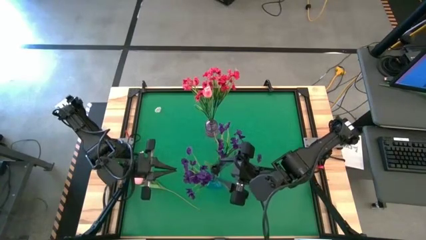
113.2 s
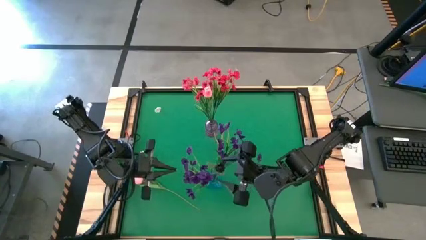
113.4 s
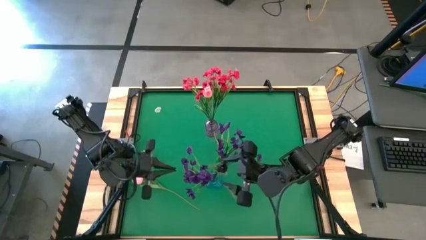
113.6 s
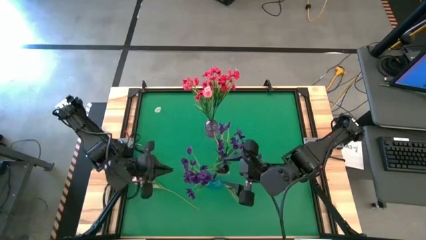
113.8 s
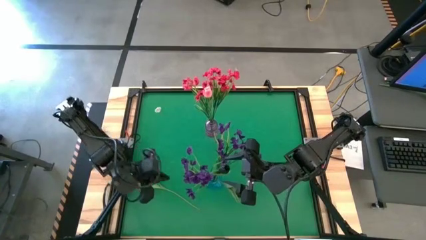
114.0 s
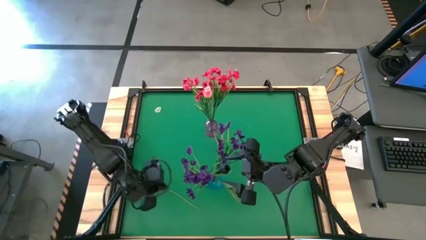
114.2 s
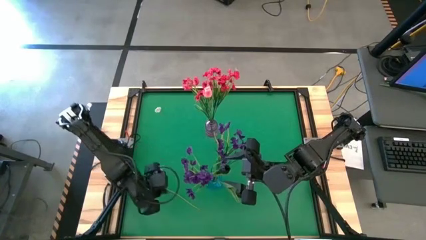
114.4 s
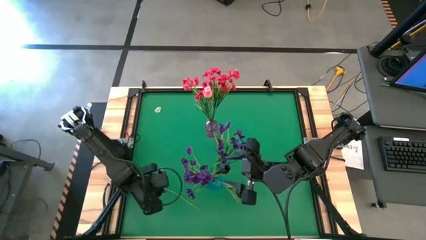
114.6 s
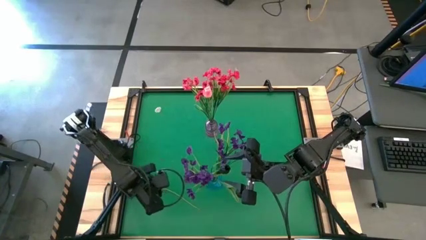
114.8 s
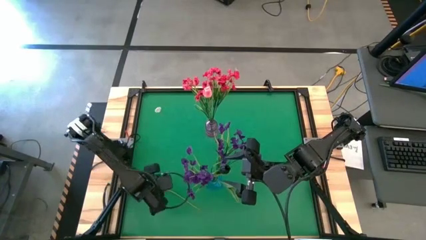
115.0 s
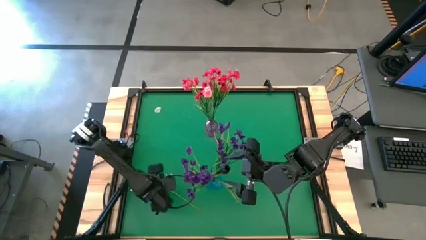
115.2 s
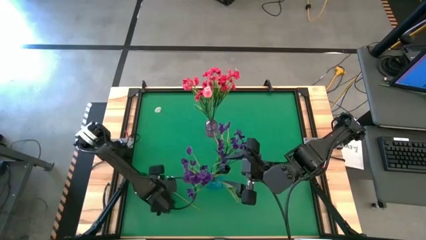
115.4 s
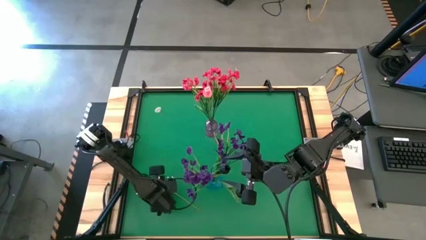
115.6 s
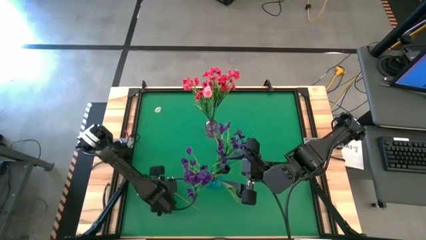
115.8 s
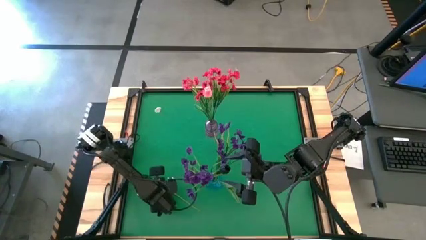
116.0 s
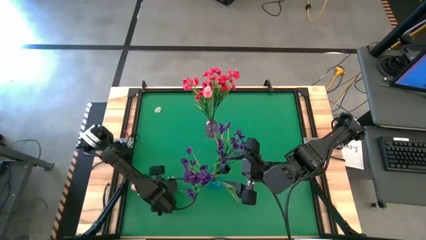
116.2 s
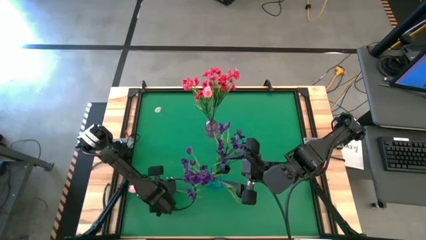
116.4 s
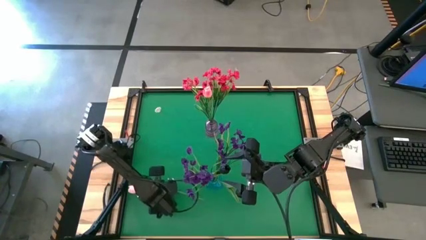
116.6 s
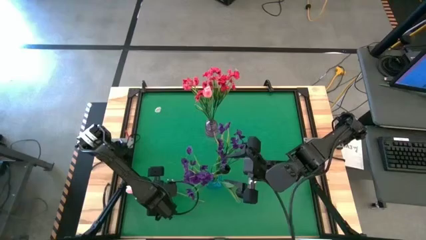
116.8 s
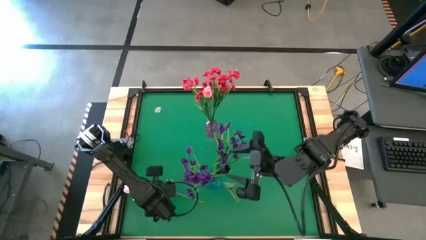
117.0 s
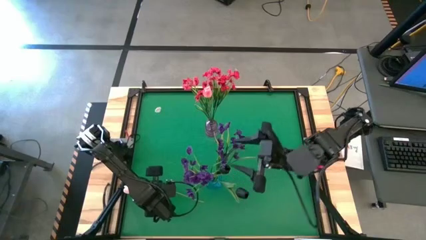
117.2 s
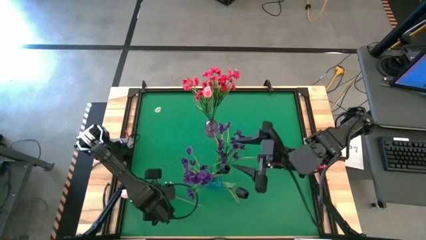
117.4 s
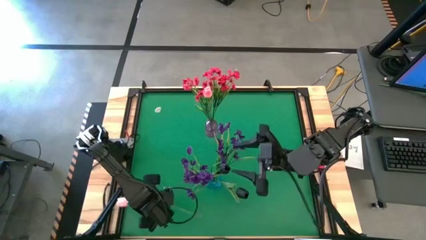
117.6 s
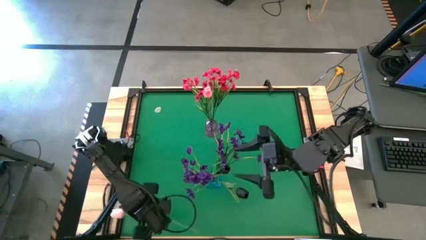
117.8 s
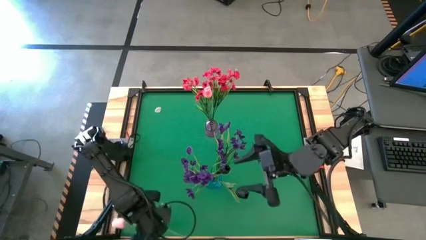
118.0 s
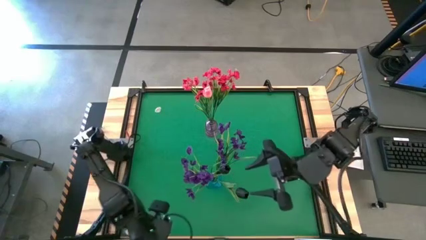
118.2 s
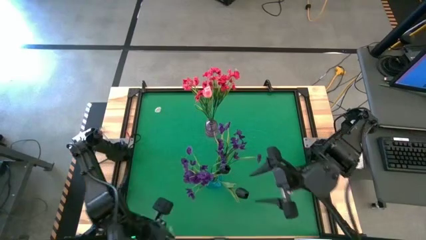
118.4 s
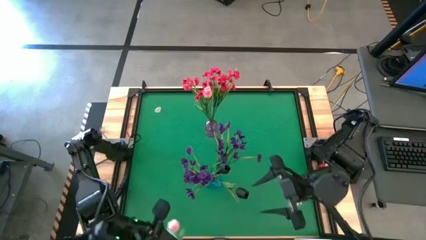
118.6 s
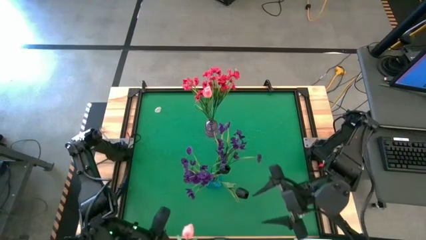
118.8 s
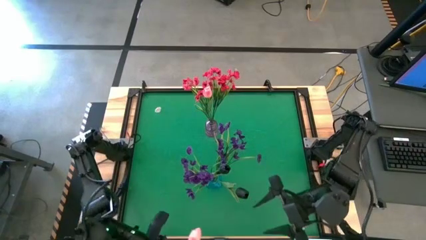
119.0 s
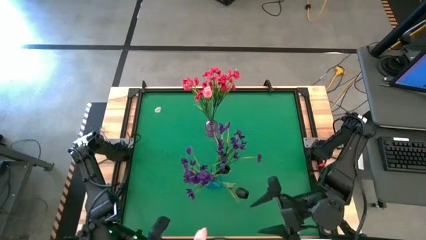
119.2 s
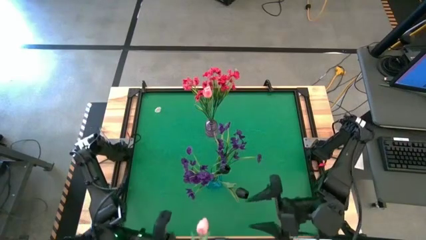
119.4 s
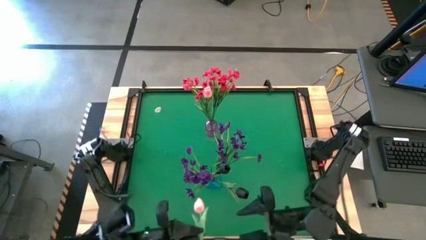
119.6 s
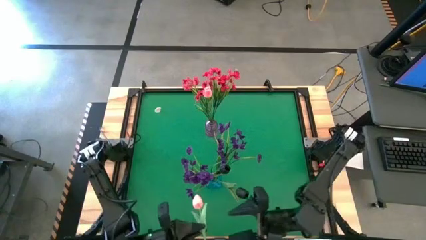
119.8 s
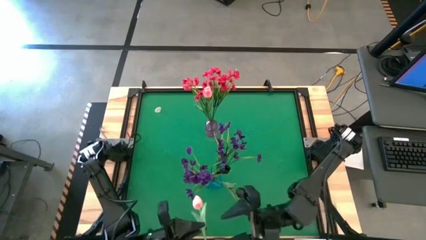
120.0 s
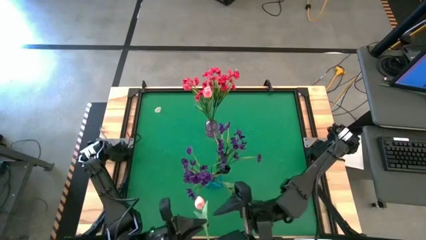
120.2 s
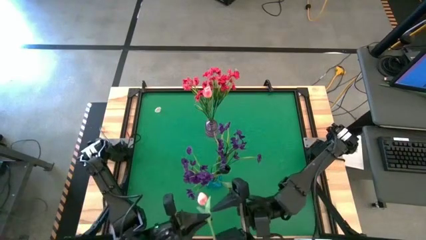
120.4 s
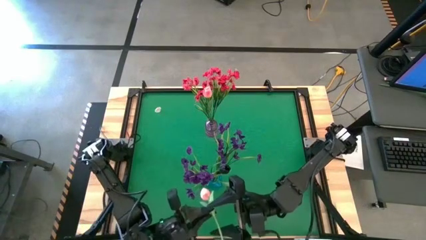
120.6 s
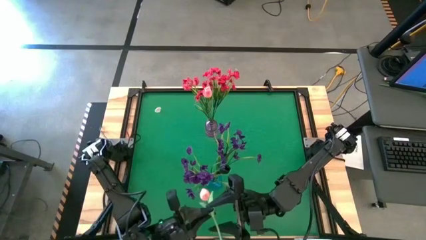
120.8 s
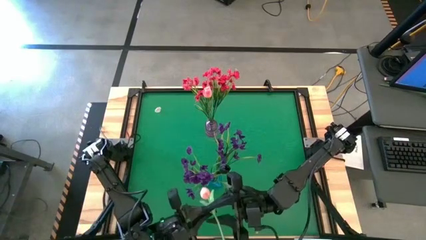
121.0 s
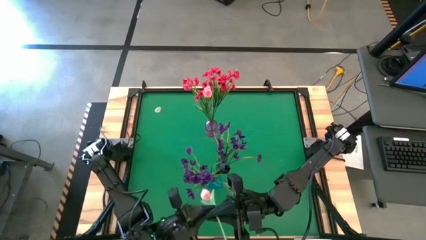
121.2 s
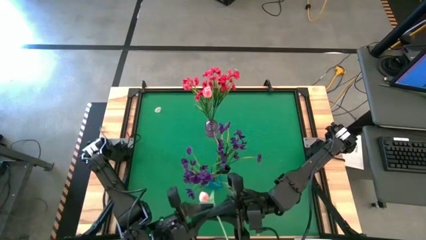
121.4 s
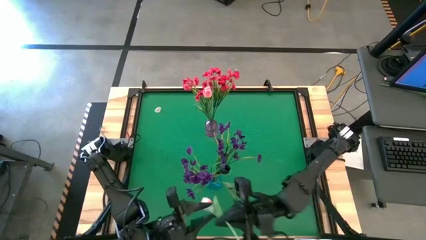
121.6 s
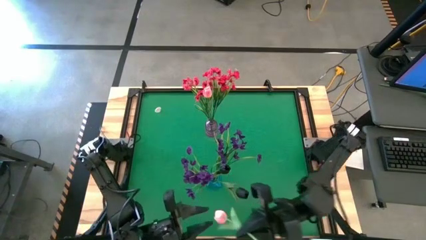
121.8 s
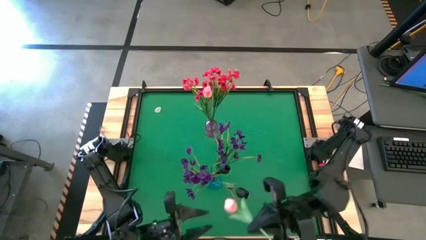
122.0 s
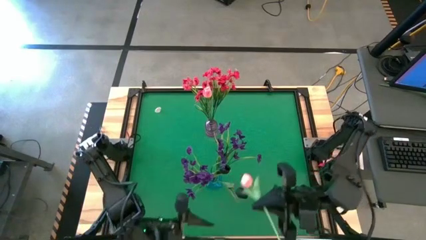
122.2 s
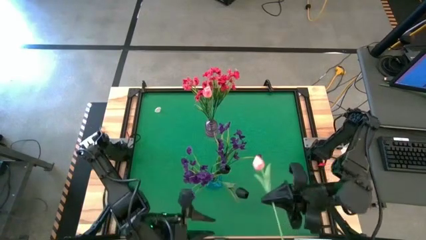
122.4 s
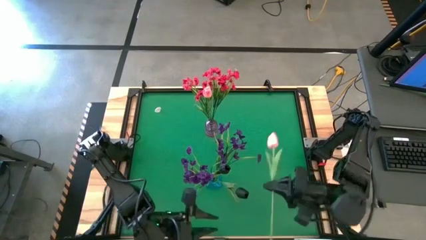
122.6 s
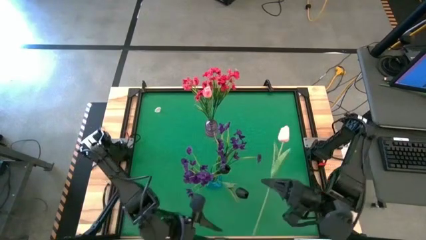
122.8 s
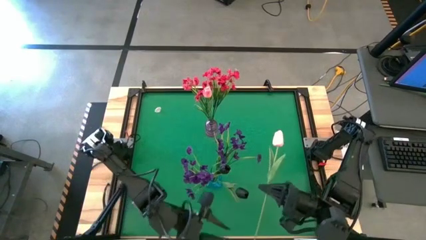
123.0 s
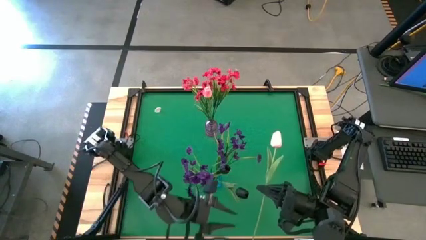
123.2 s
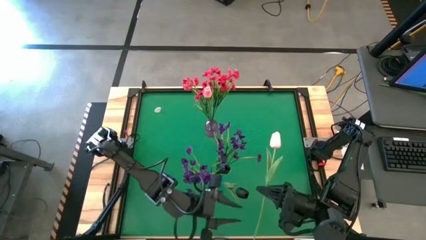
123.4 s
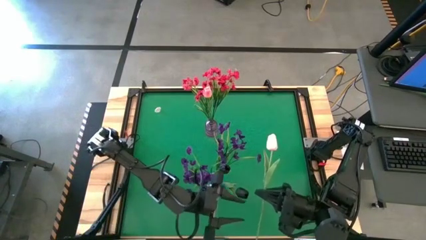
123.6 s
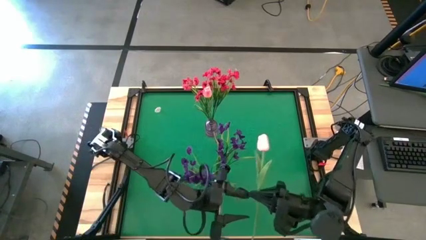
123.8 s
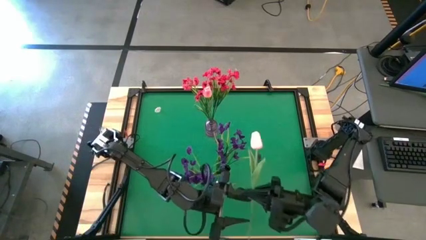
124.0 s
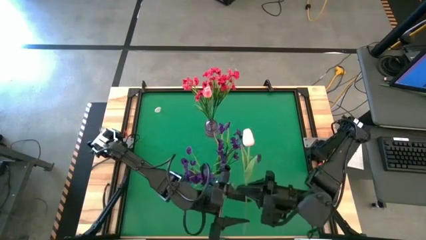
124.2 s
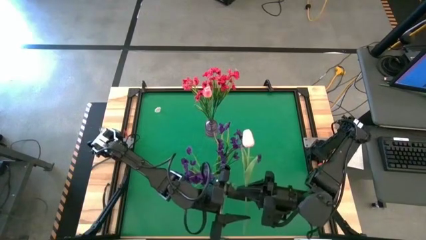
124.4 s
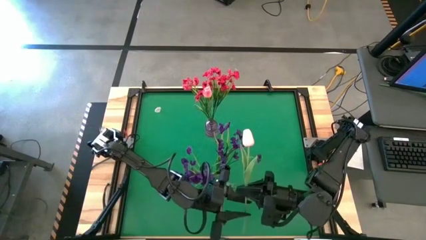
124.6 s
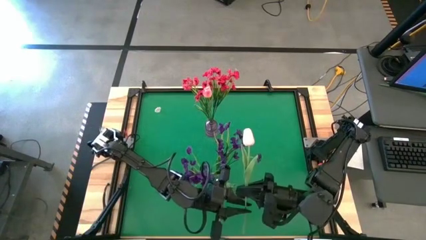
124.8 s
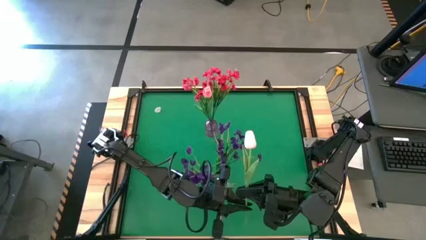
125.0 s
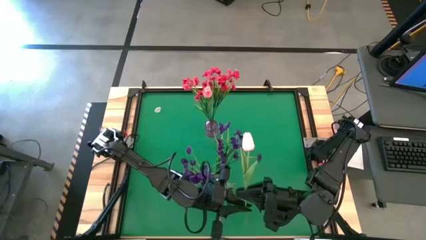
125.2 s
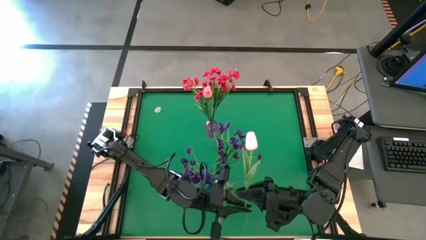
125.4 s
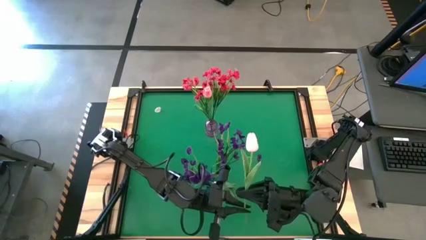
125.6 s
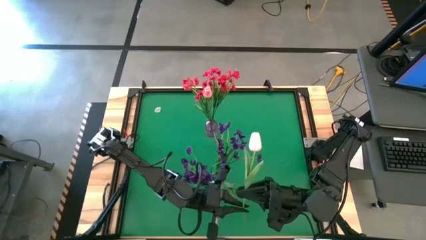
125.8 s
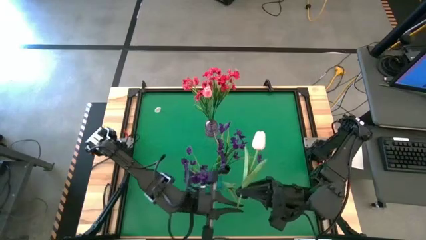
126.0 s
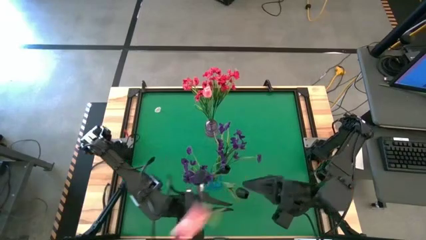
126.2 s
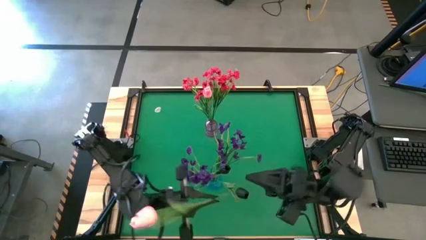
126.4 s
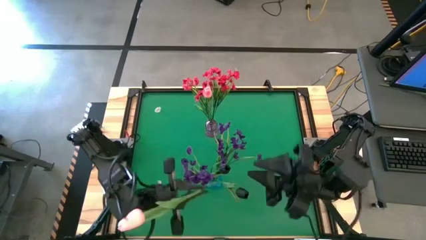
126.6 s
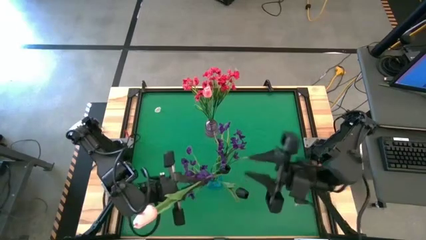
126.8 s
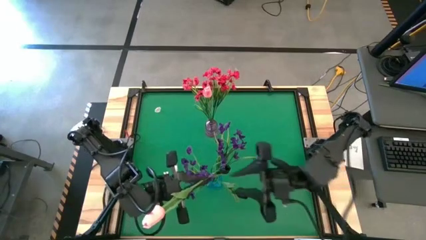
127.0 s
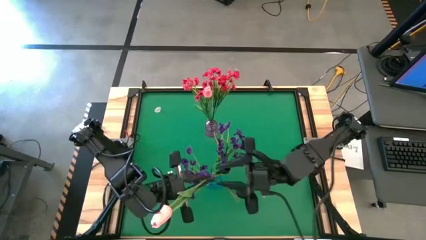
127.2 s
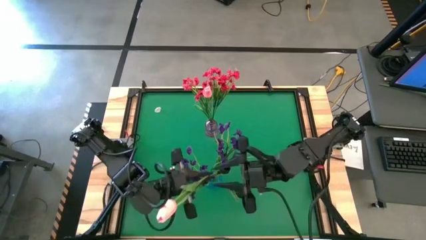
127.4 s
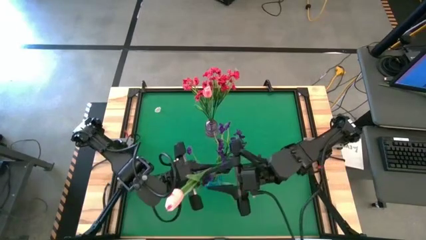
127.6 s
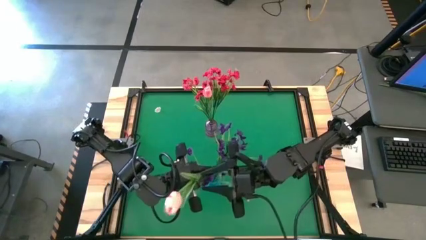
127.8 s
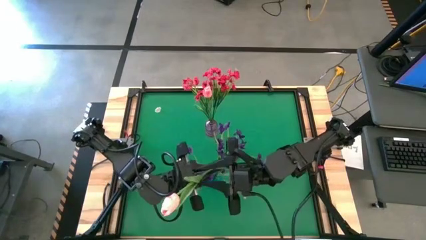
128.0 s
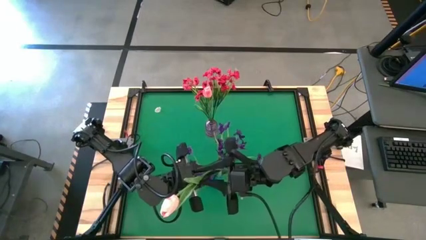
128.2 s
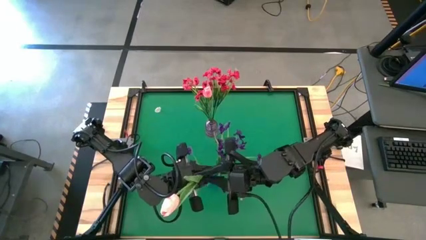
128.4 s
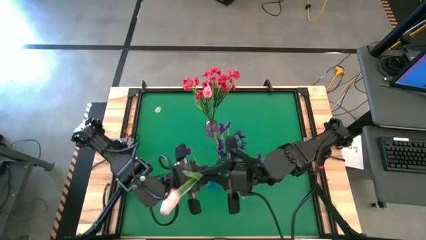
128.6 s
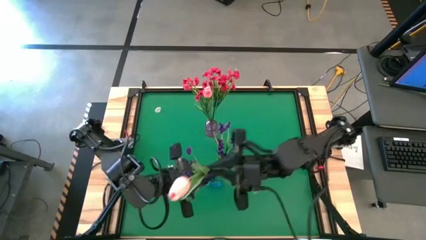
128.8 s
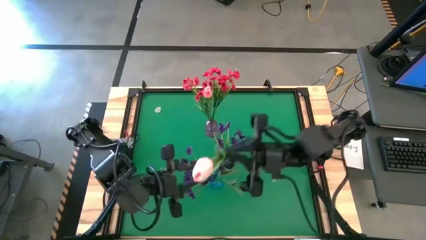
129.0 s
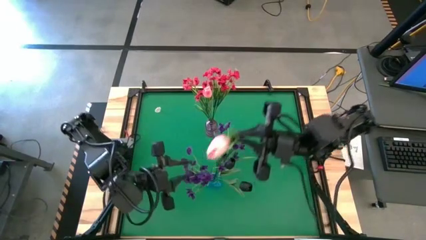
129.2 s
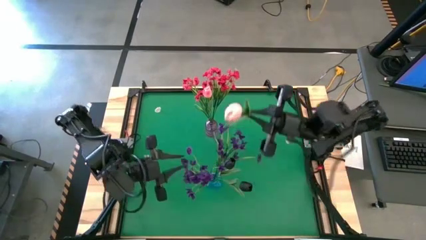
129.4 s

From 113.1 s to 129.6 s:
Task: Sort flowers into vase by color
Put the pink tulip into the purple vase
